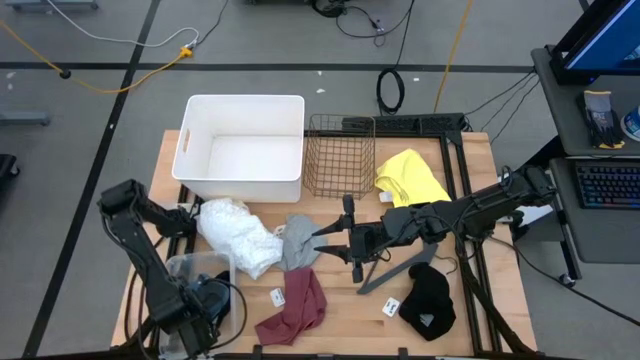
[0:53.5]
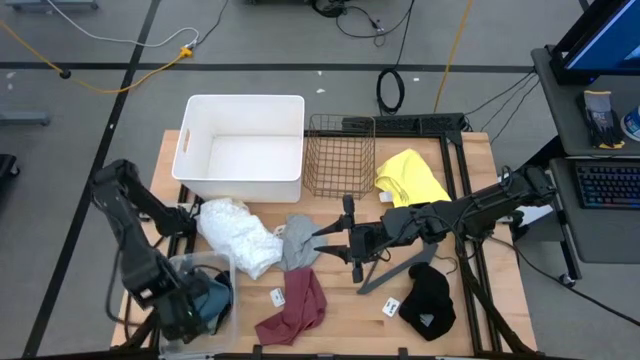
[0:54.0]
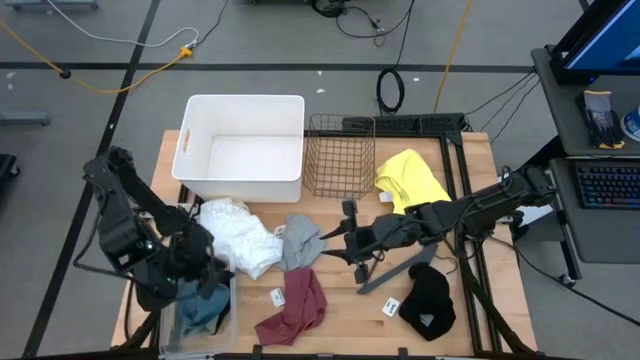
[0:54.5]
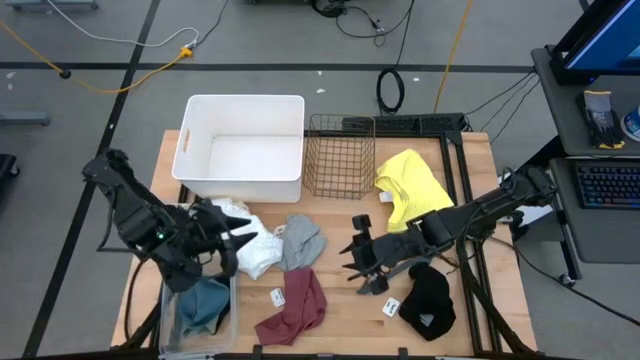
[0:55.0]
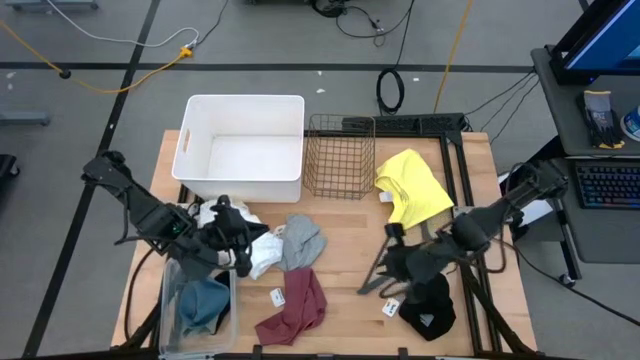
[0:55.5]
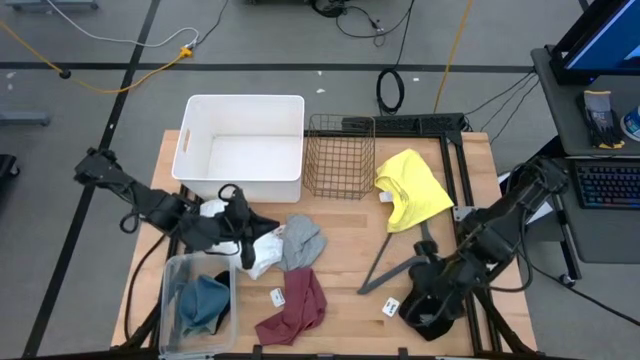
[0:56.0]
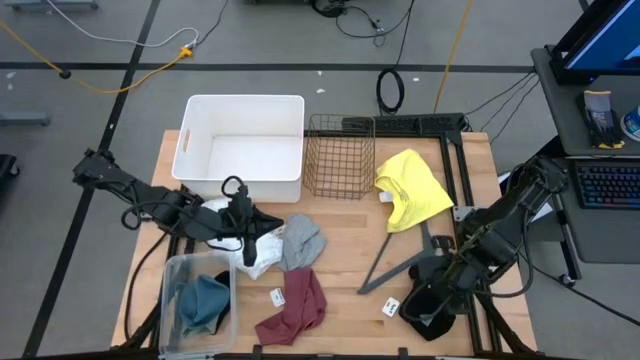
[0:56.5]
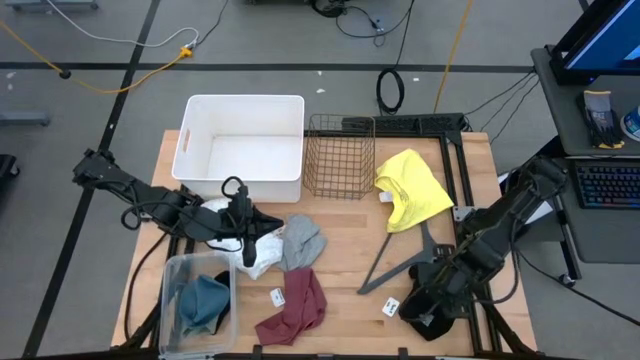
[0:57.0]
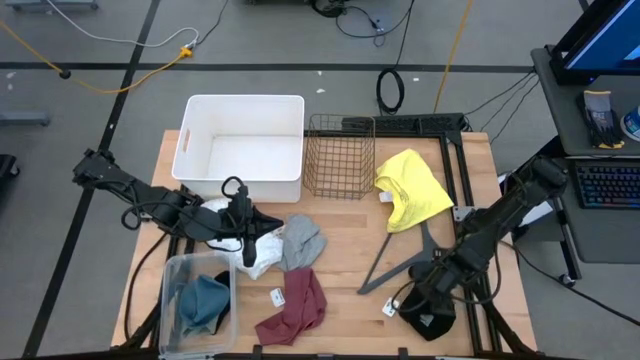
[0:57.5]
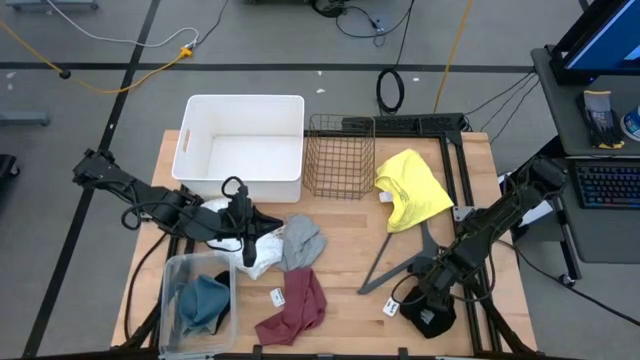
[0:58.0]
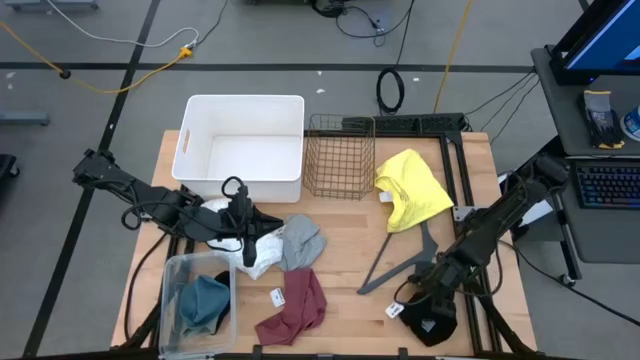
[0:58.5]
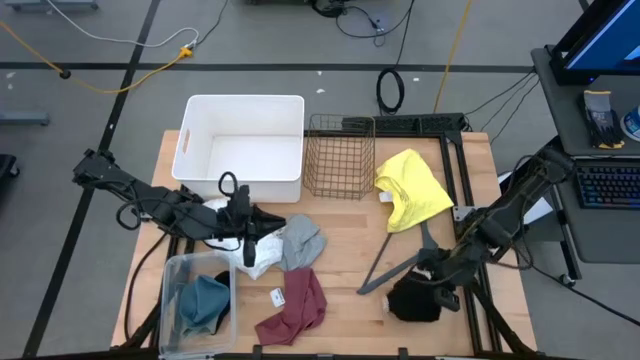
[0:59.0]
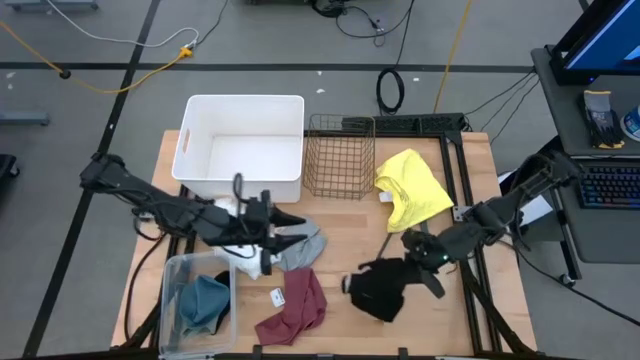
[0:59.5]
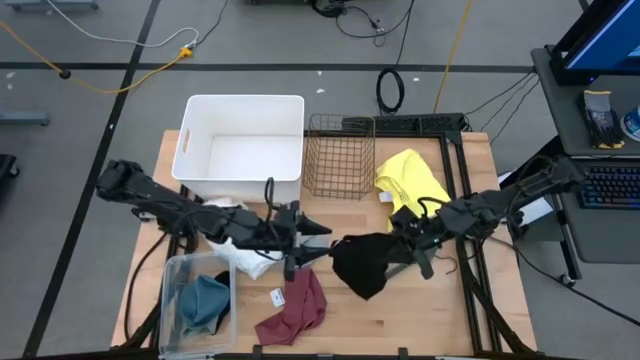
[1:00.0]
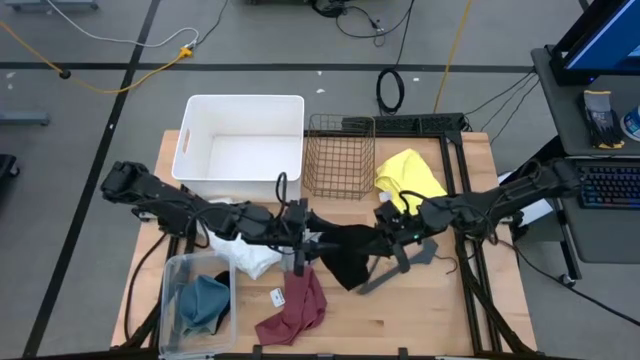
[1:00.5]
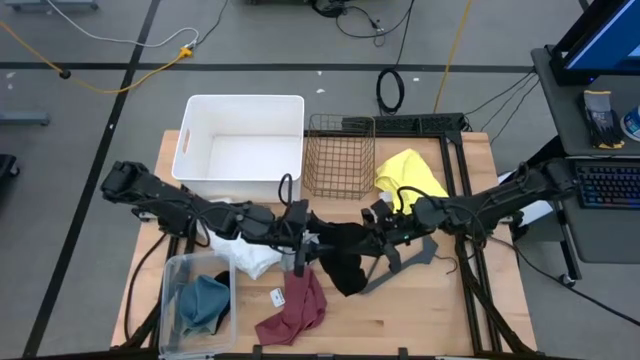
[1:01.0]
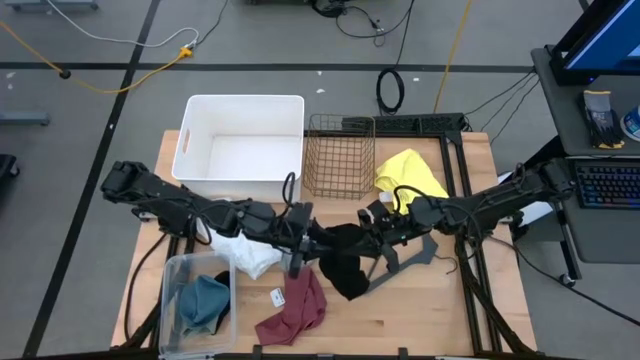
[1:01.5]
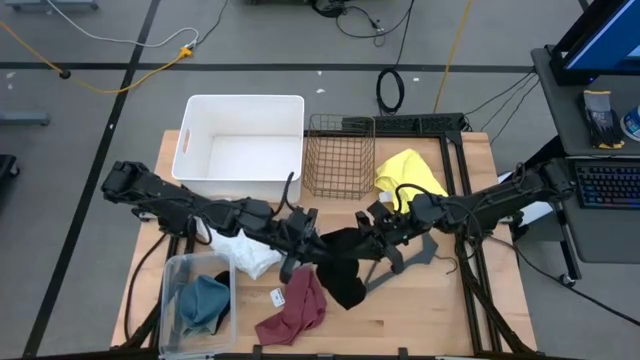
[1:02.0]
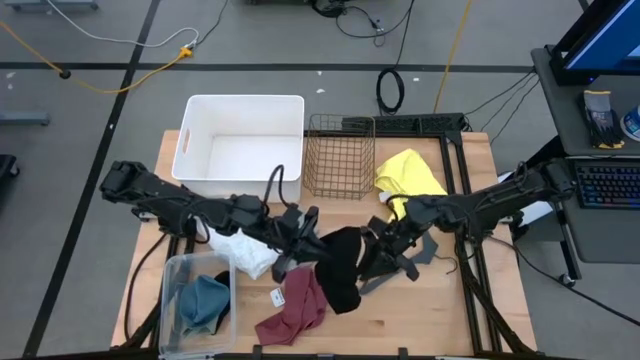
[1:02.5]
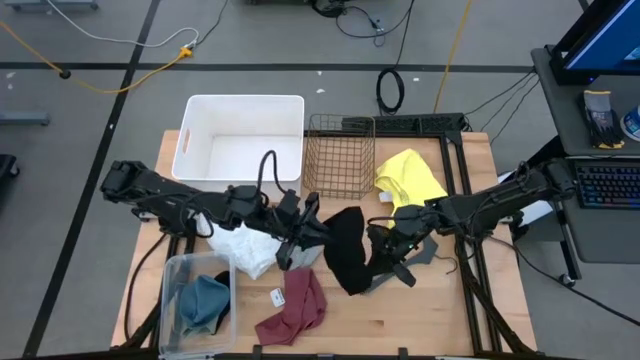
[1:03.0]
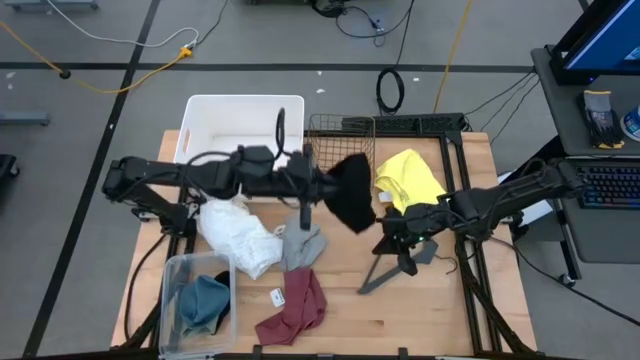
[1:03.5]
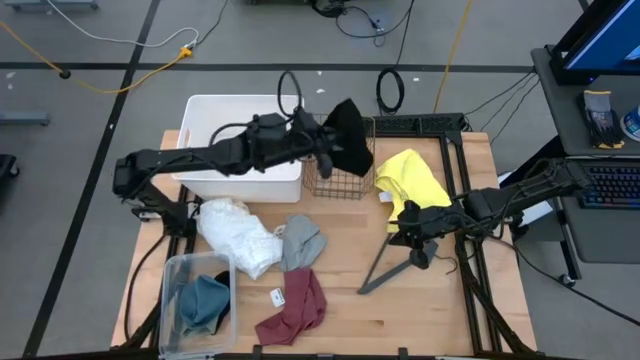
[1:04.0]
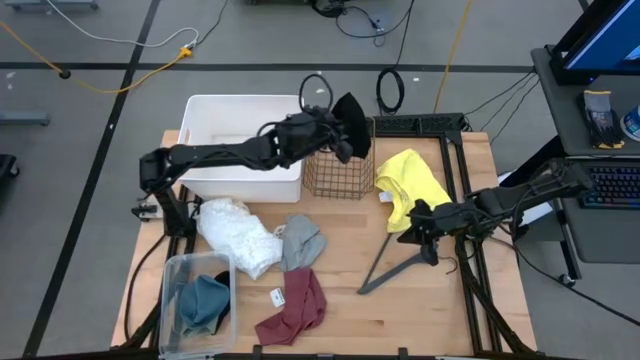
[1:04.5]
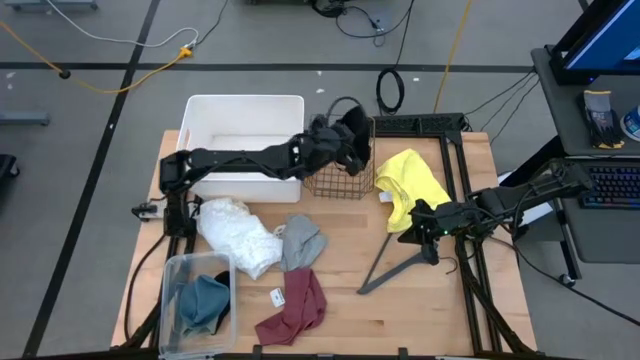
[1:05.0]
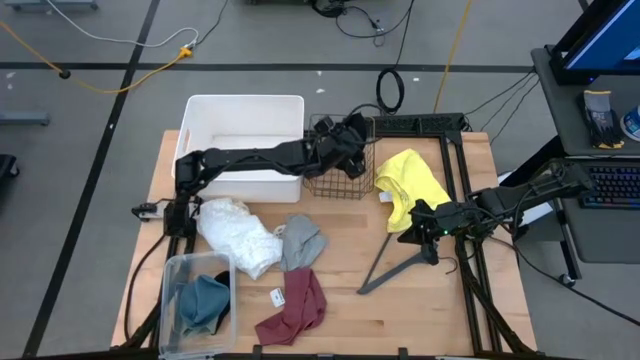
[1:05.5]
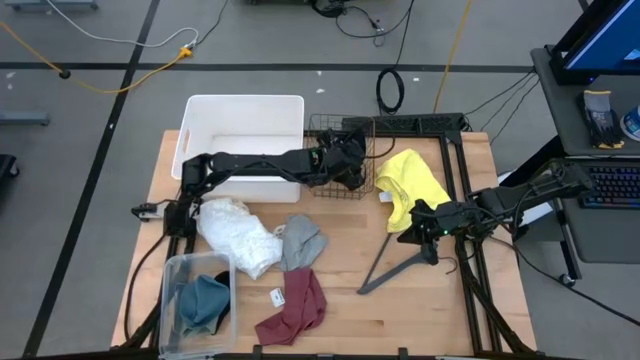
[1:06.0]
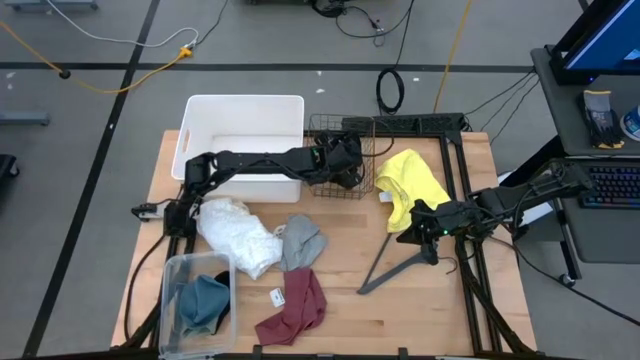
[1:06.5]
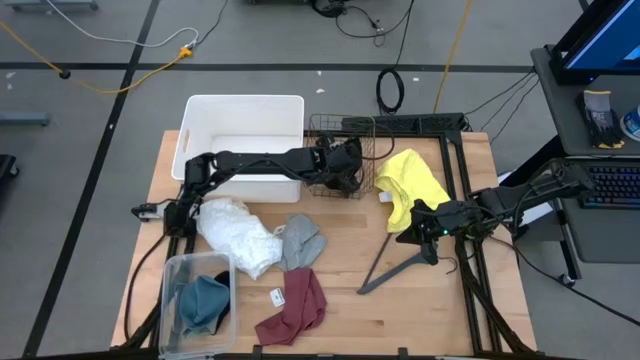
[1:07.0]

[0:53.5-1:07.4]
Task: Pick & Place Cloths
Put the black underwear into the wire basket

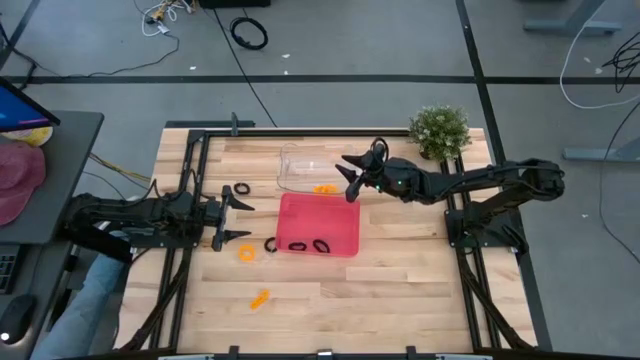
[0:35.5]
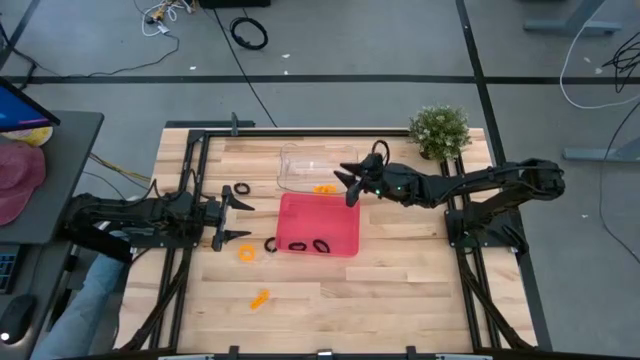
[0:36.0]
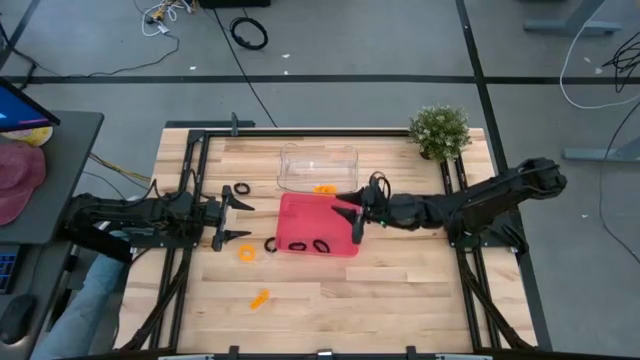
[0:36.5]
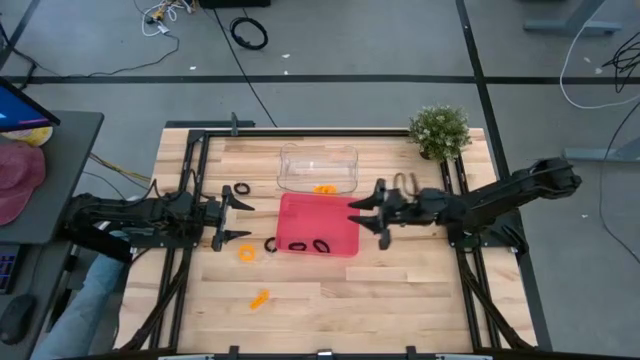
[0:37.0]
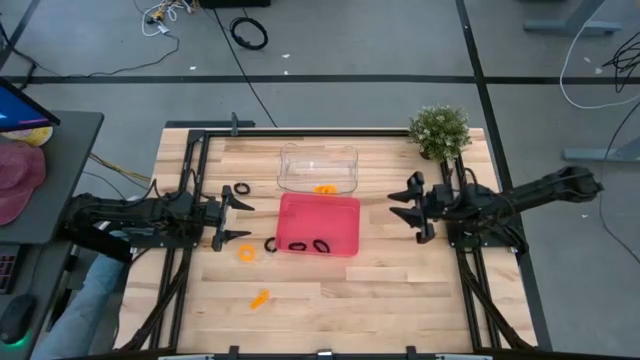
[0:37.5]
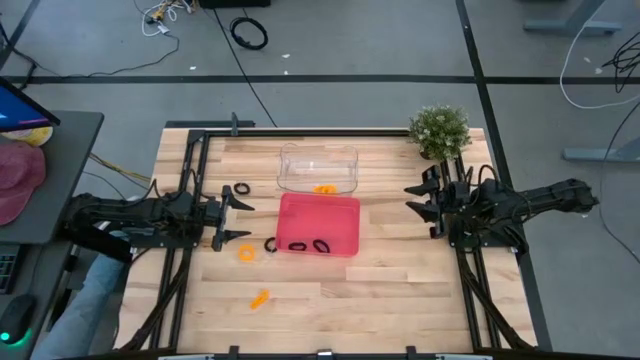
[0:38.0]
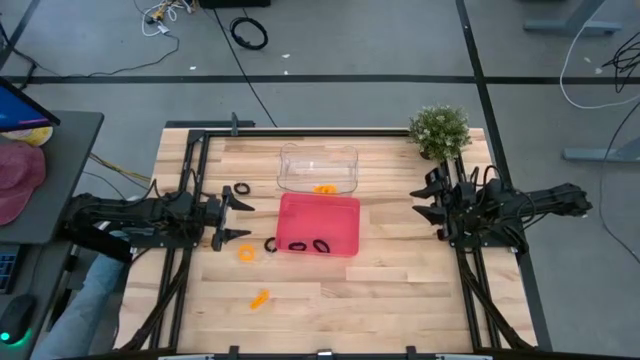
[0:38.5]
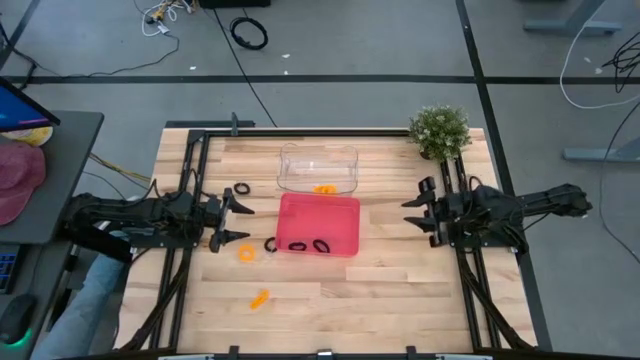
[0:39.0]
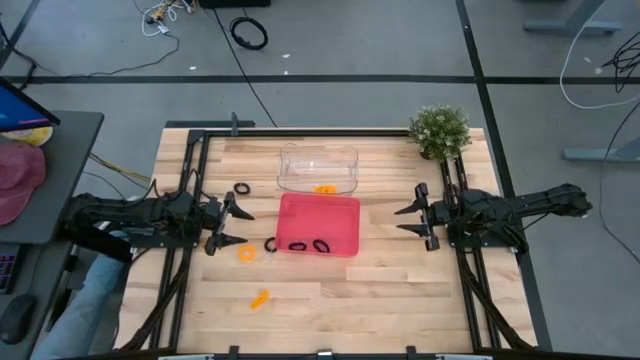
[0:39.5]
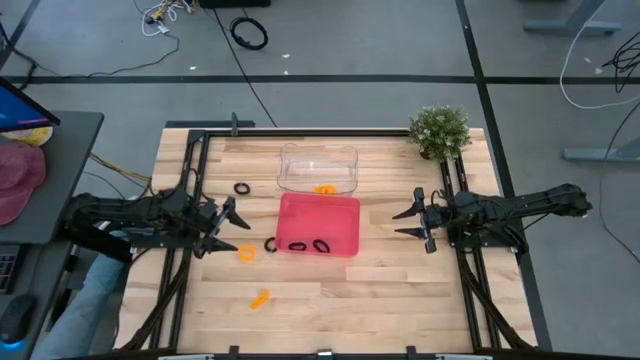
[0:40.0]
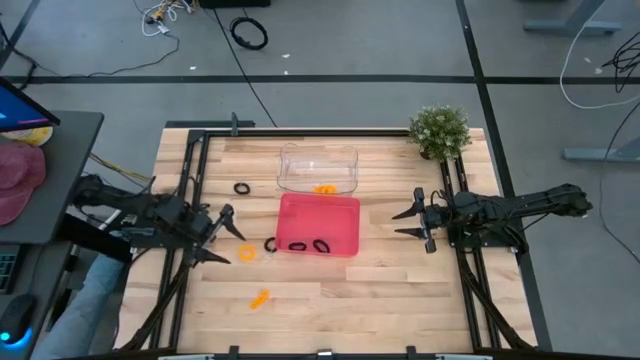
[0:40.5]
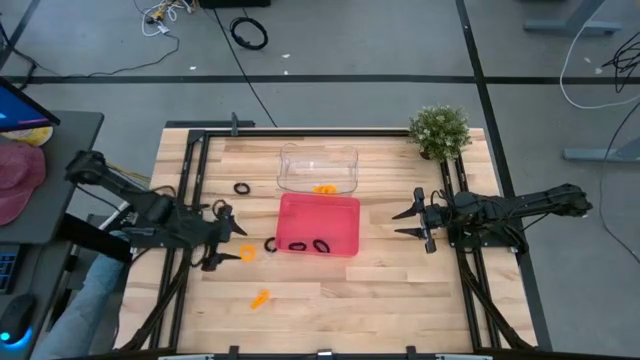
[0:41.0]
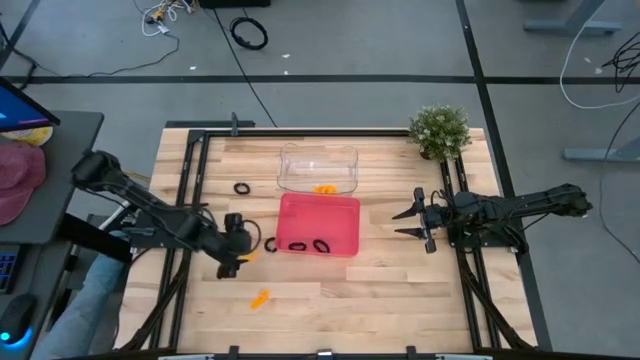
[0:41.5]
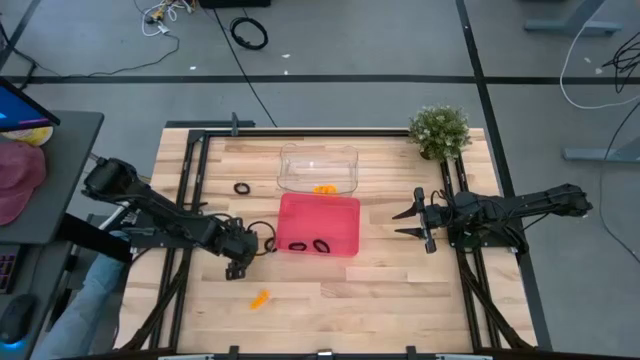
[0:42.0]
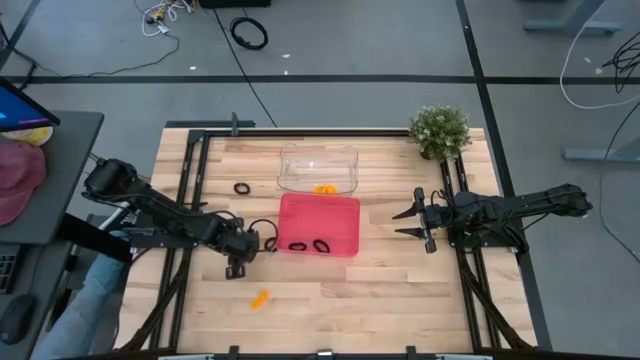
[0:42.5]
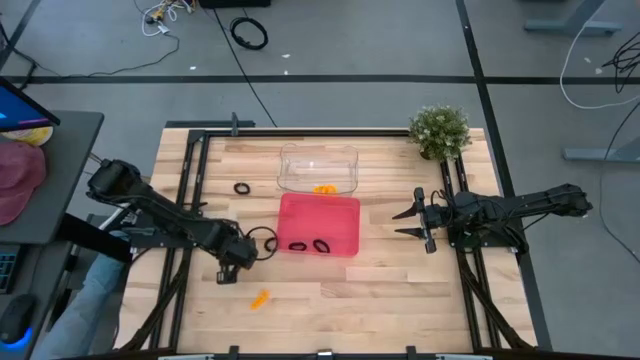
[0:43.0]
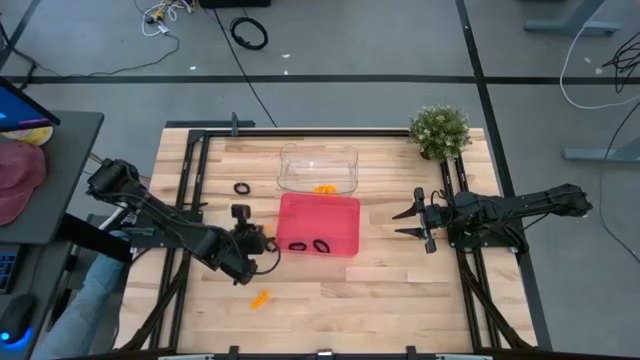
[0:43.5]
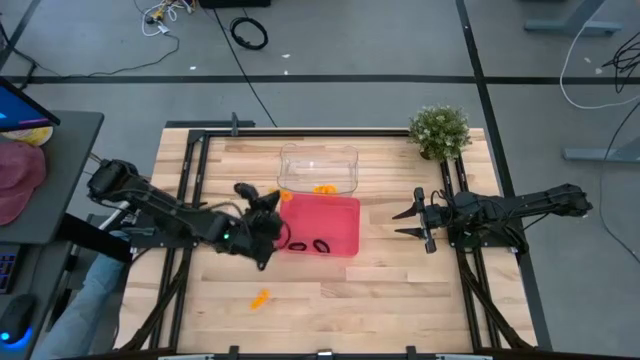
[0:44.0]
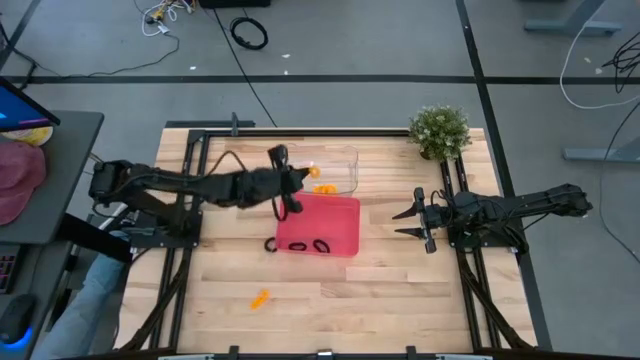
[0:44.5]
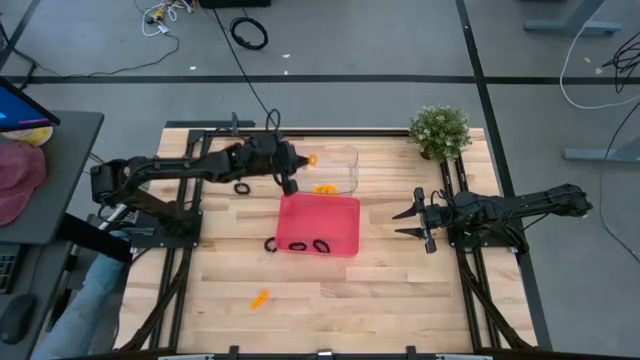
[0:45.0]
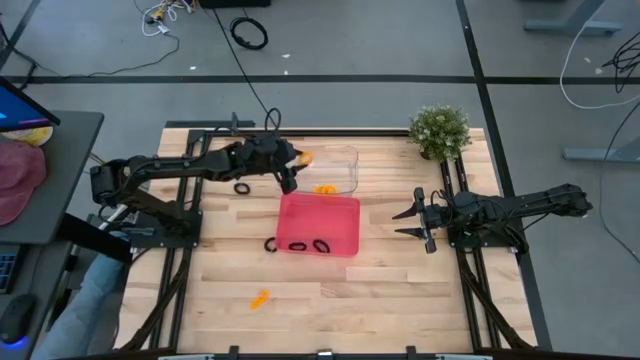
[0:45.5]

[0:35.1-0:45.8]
Task: Sort spring keychains
Put the orange spring keychain into the transparent bin
